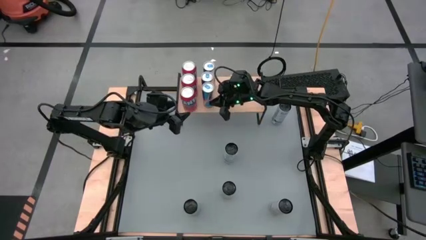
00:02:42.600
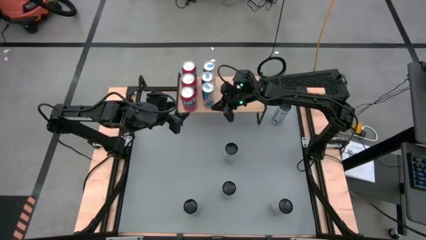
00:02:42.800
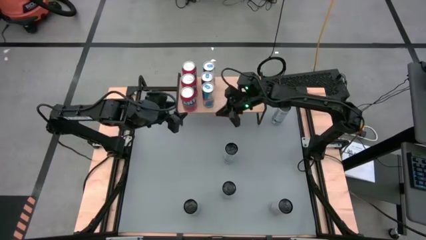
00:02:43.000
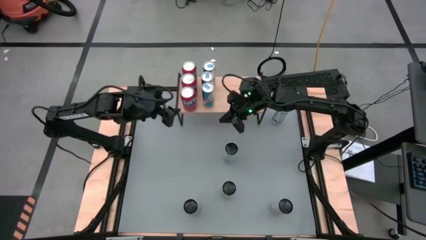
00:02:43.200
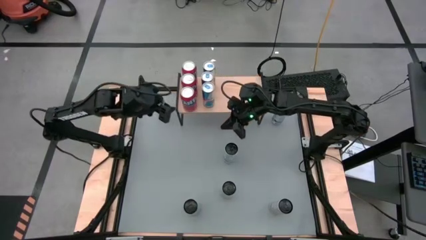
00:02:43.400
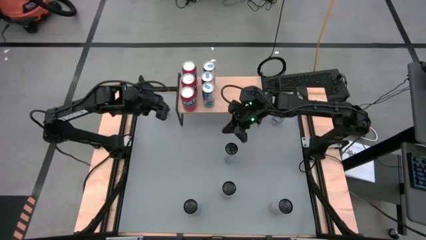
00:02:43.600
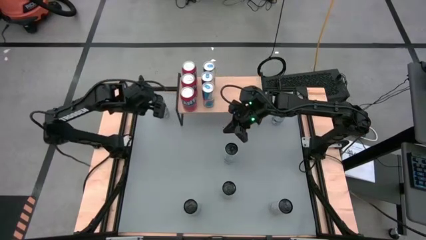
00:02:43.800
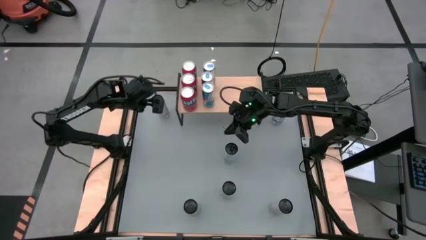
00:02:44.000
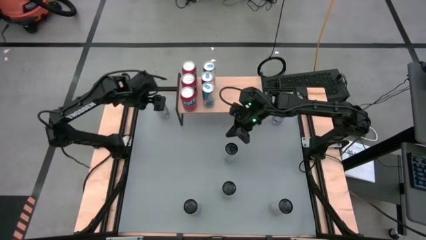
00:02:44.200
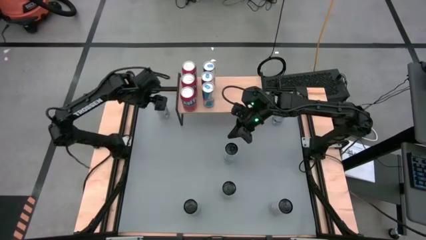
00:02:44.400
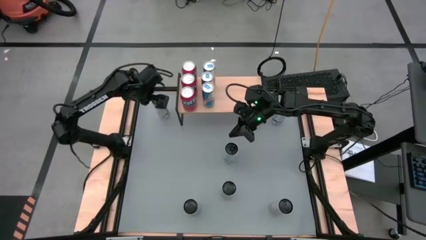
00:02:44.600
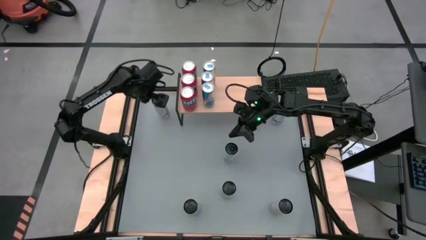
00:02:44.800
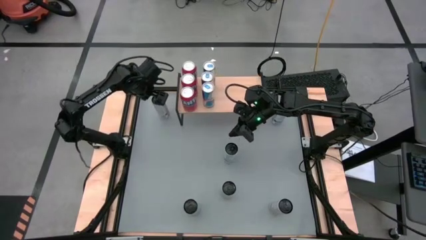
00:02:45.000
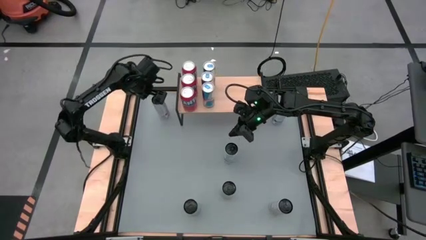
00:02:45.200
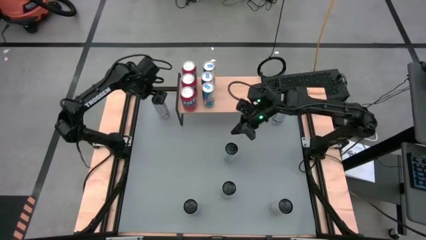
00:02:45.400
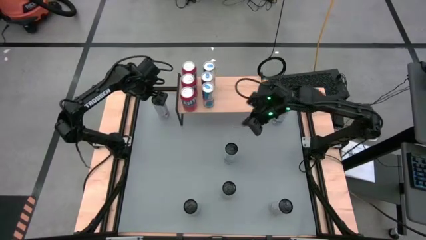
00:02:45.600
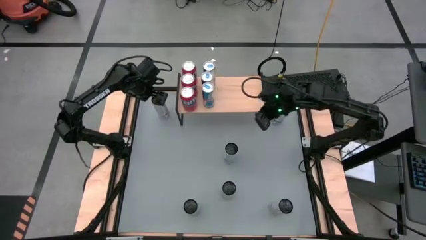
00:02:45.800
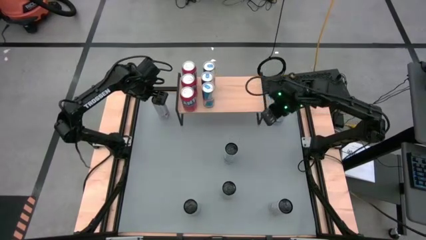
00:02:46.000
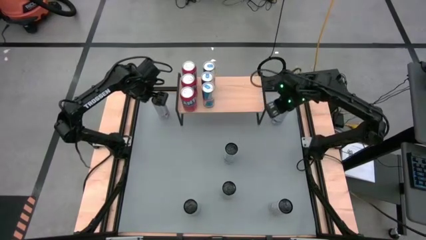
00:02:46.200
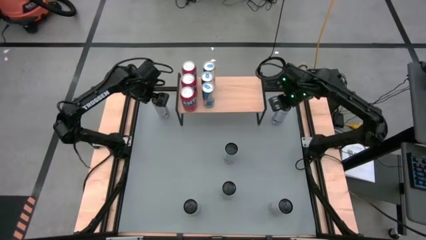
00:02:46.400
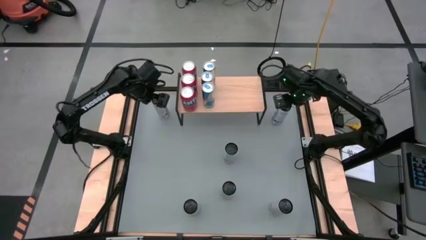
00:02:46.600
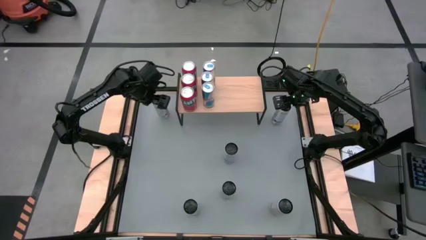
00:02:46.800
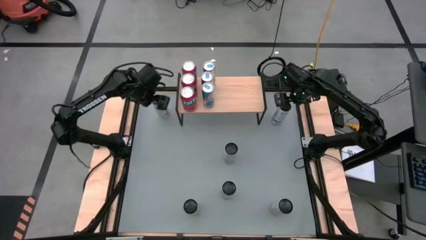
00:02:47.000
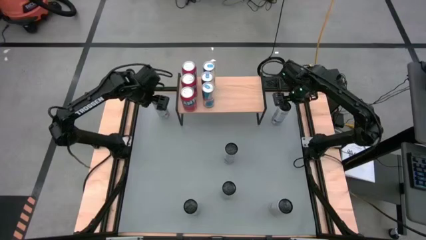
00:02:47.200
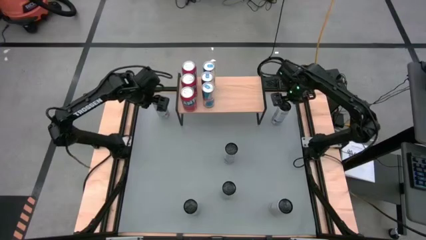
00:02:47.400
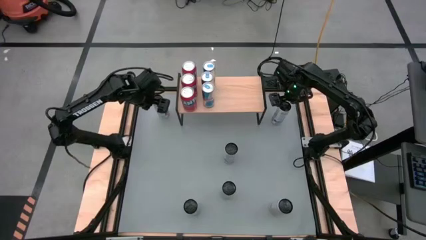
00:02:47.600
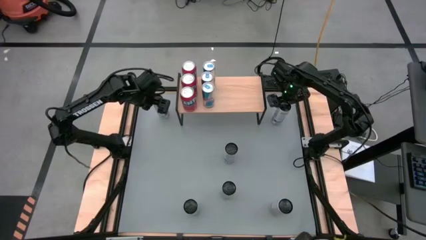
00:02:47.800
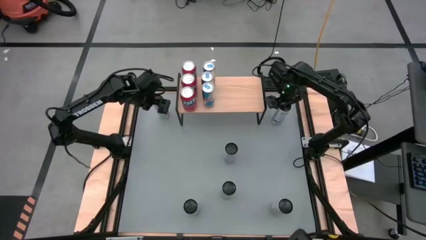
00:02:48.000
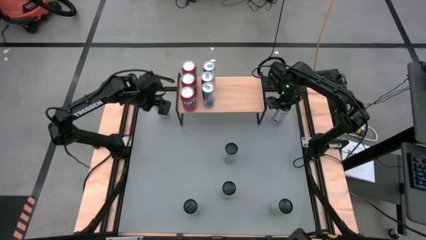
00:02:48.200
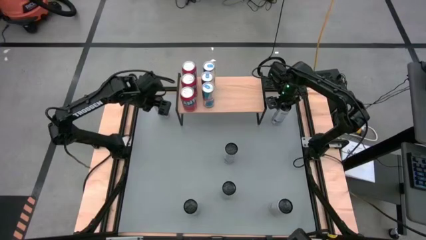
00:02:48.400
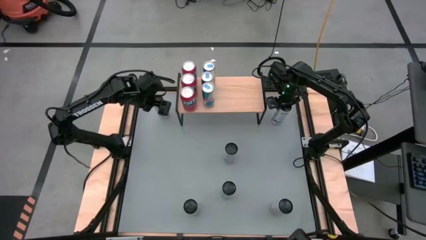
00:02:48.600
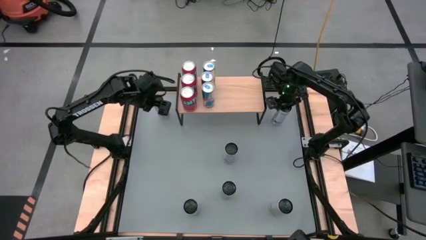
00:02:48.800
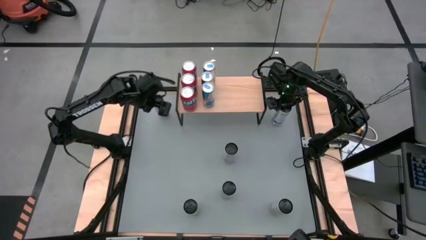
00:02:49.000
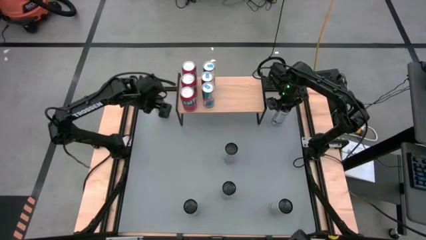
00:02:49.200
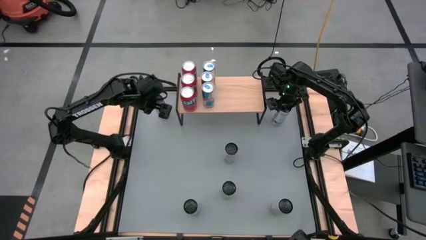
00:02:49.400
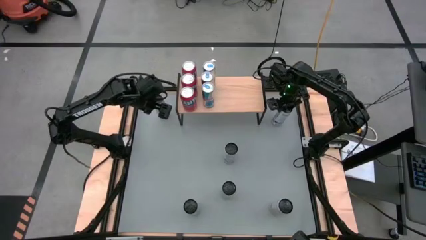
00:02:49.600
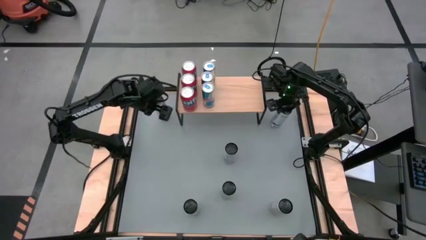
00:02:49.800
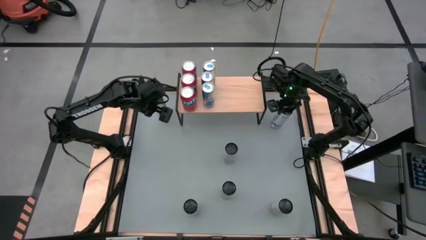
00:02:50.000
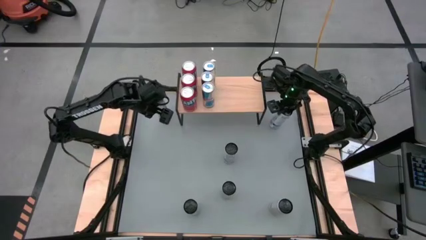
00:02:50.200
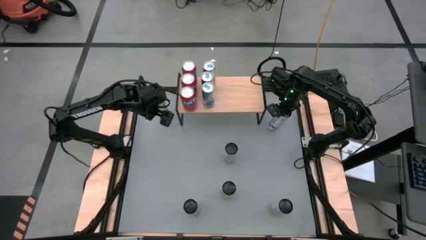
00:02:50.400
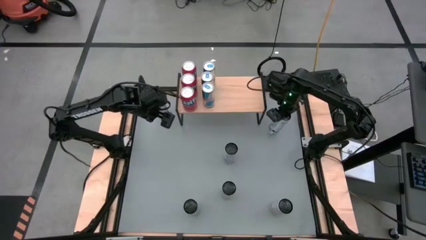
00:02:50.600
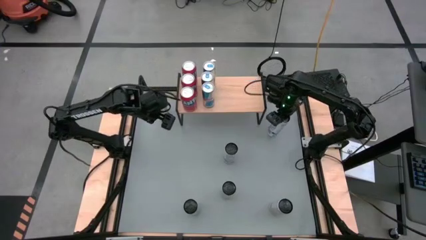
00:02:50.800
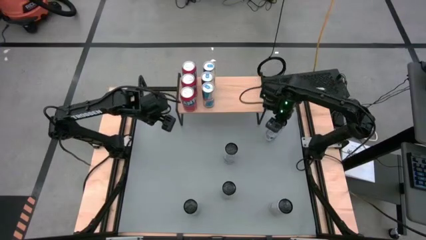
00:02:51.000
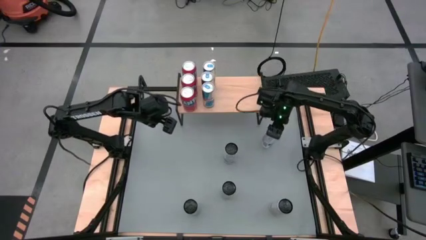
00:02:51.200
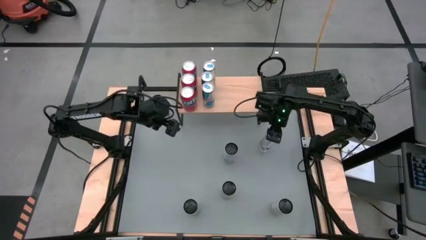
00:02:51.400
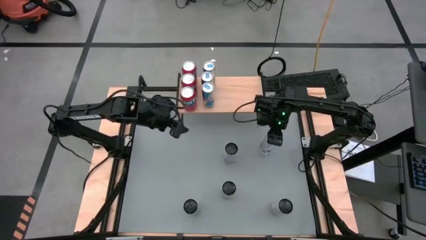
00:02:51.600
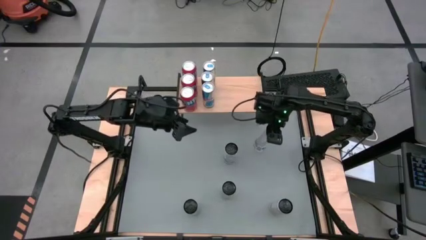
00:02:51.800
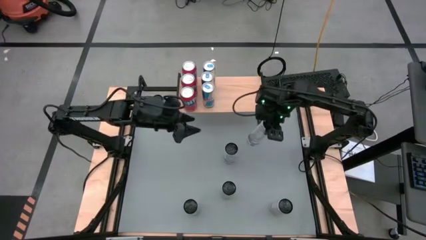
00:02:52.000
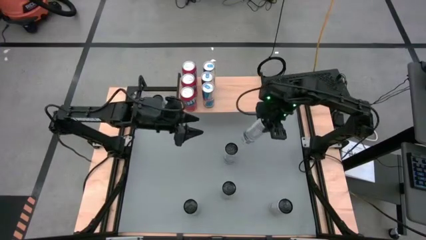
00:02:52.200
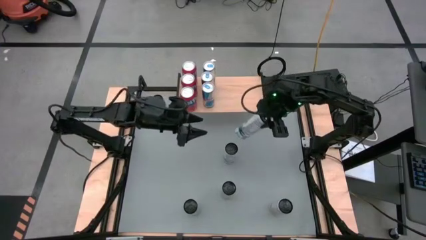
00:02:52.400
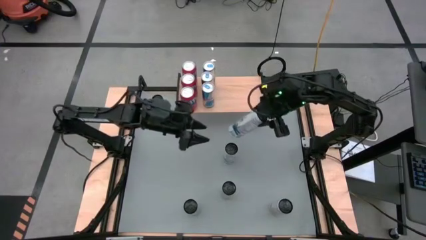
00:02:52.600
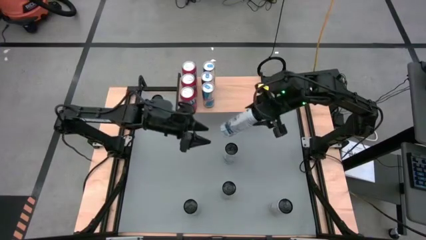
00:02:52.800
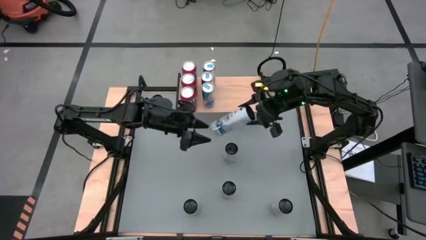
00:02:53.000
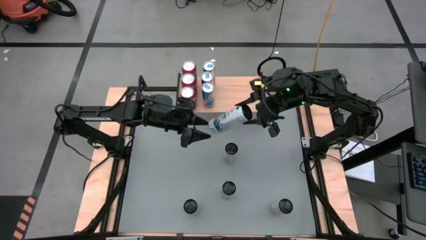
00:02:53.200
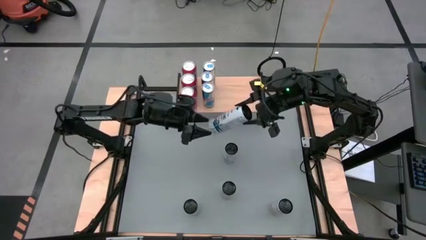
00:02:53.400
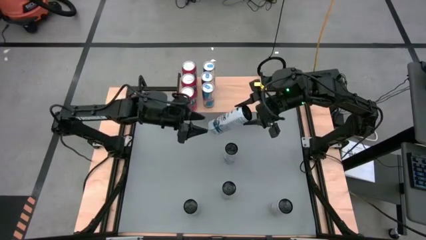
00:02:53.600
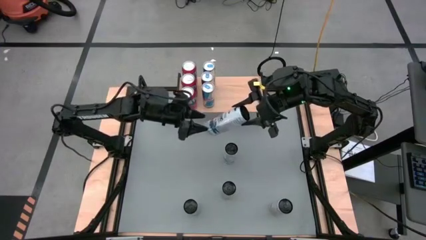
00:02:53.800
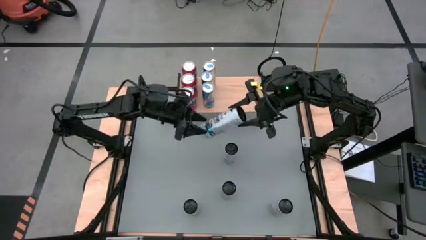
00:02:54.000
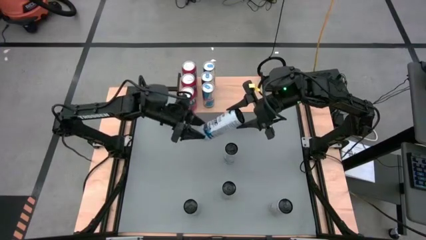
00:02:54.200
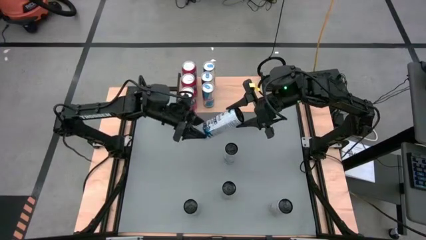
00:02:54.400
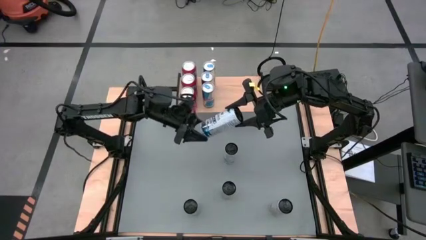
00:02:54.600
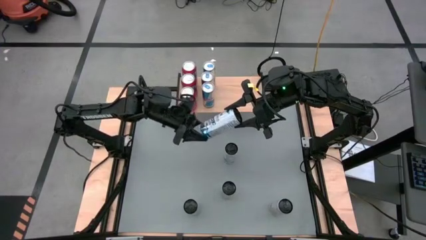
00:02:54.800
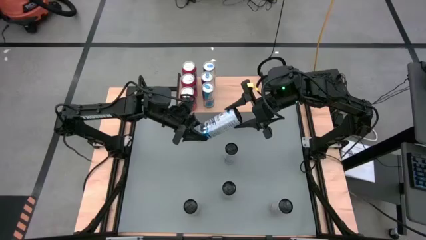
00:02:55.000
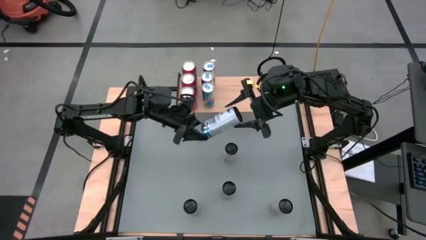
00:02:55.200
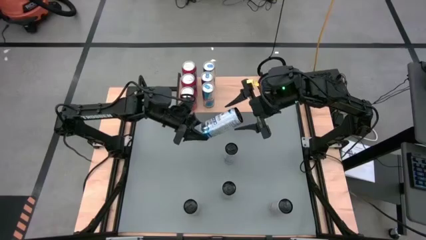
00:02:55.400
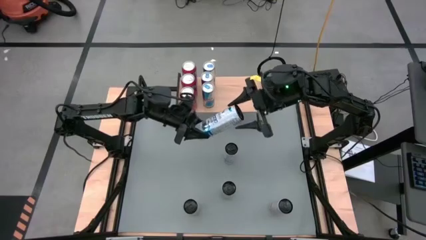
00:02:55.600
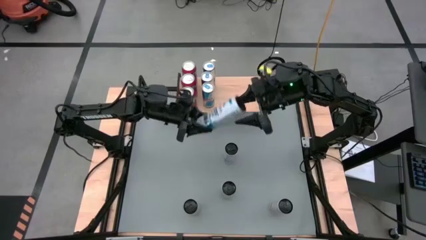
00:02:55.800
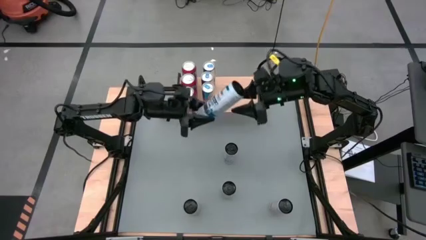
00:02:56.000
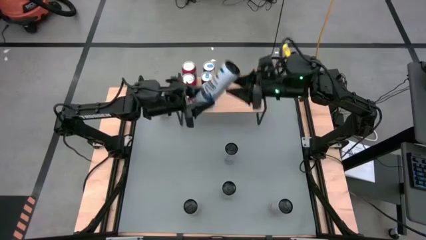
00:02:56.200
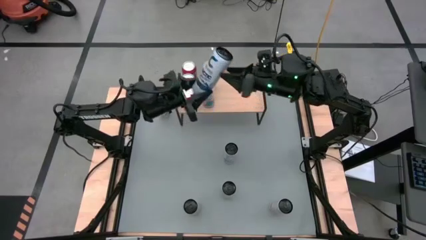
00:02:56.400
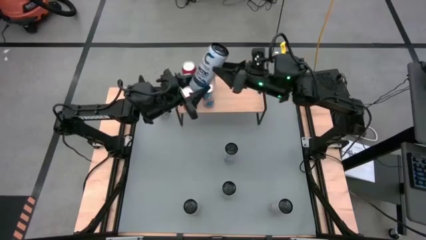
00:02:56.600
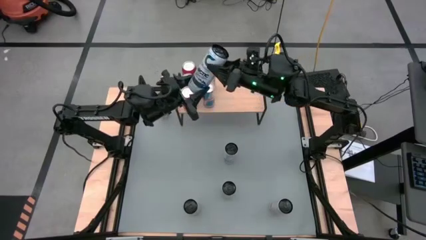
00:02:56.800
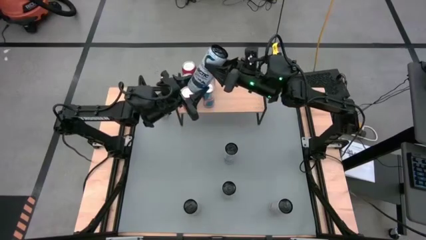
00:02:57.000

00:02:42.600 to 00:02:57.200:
Task: Place canned beverage on shelf
Put the top right white-blue soda can on the shelf

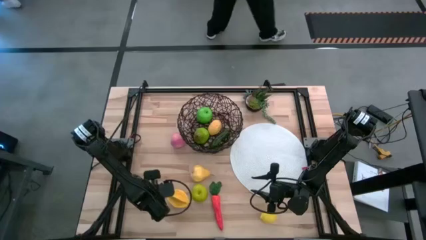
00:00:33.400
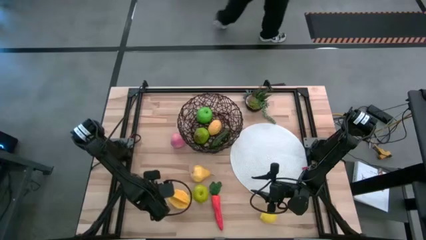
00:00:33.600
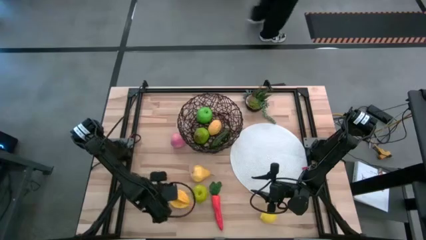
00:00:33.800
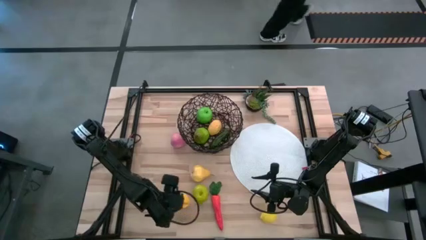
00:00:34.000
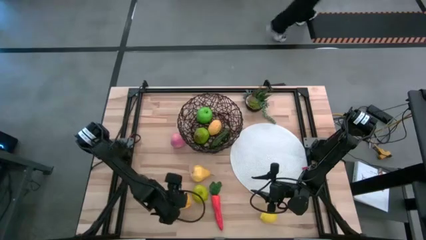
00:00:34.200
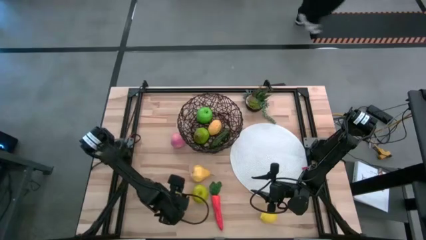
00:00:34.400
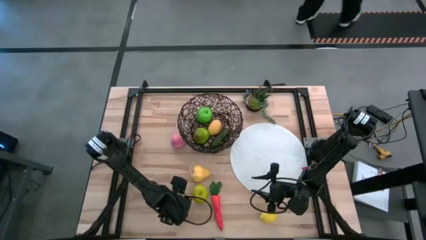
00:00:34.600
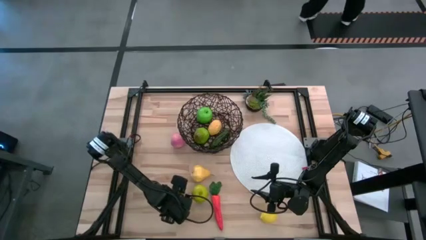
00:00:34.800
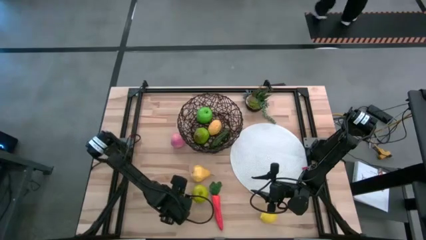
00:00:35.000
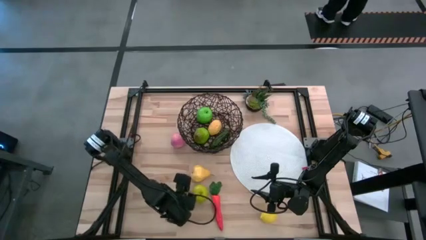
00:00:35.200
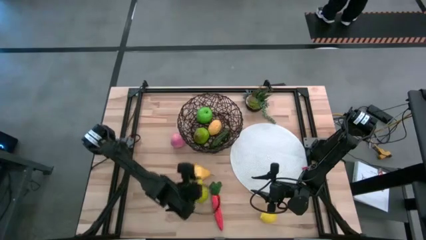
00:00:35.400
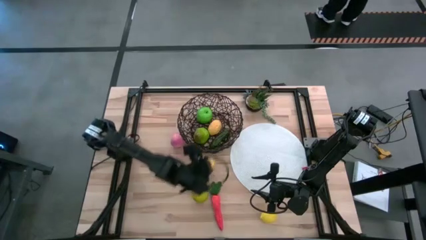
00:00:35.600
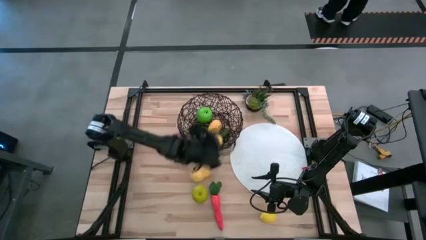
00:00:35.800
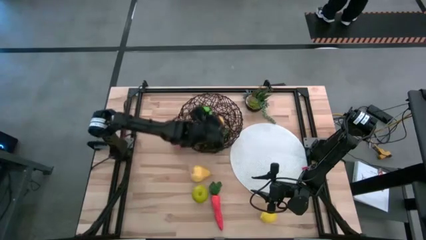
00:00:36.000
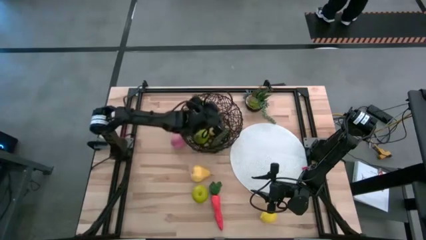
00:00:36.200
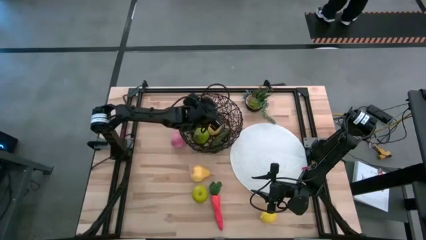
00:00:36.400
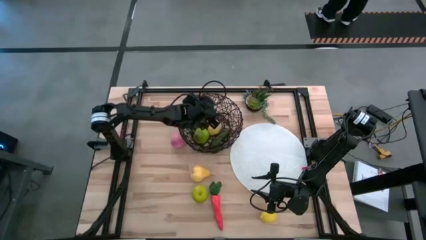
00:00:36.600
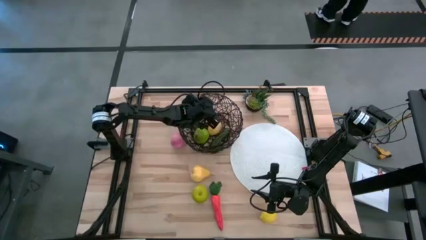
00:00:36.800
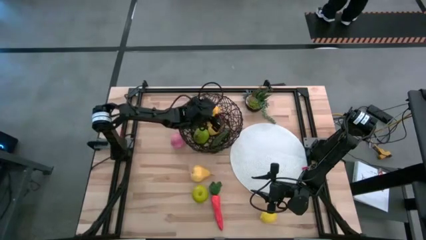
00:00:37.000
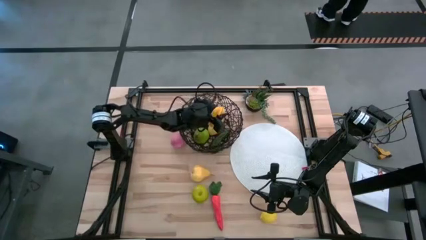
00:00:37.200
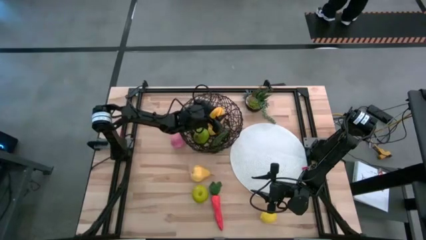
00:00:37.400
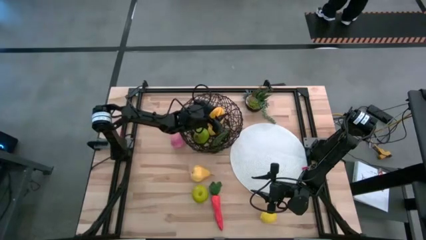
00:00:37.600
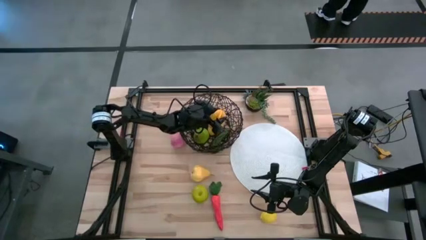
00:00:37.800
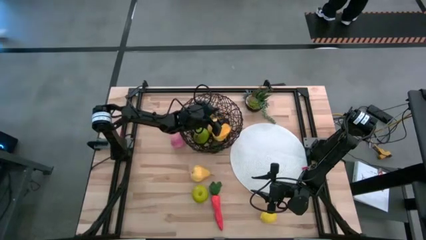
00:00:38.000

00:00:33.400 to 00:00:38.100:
Task: Build produce basket
Put the starfruit into the wire basket
